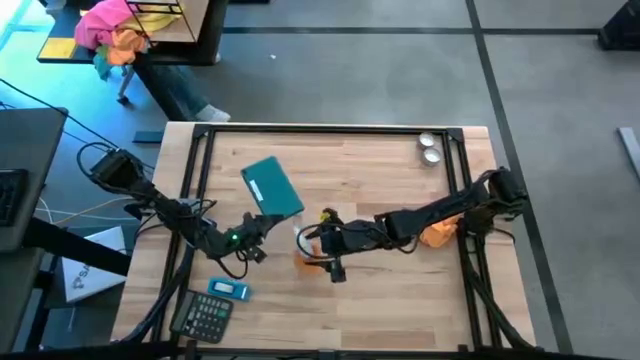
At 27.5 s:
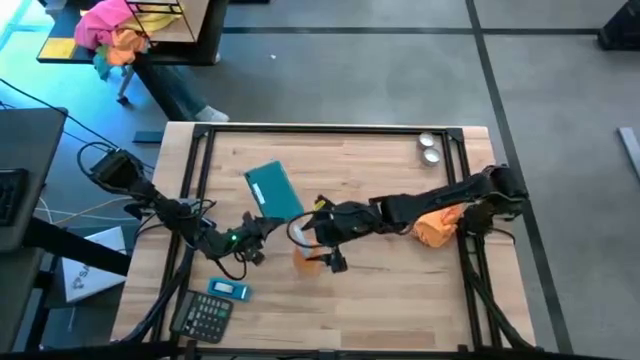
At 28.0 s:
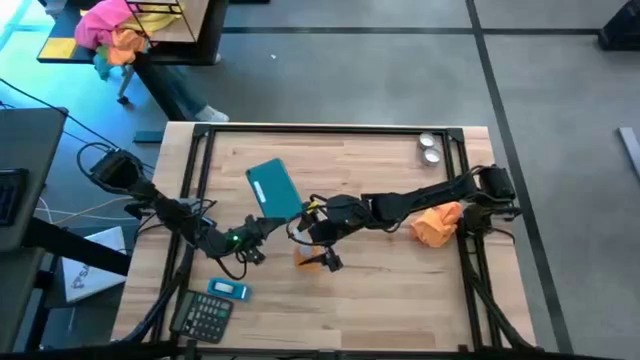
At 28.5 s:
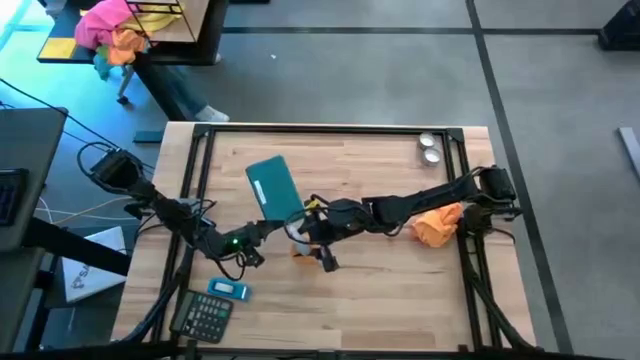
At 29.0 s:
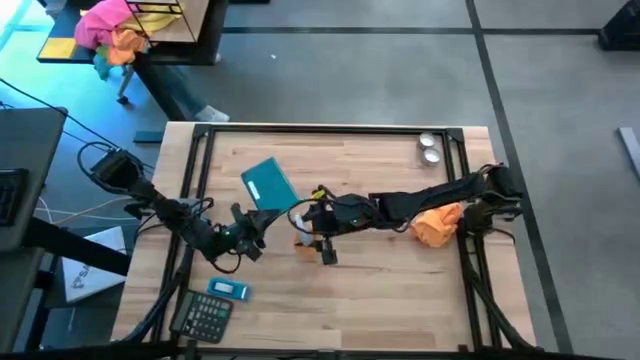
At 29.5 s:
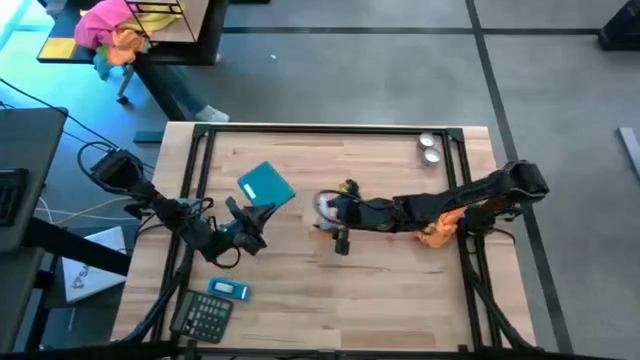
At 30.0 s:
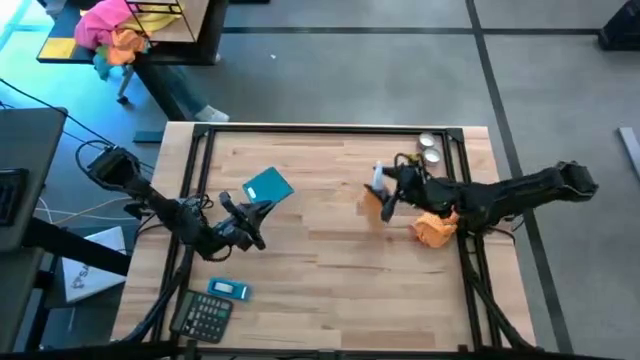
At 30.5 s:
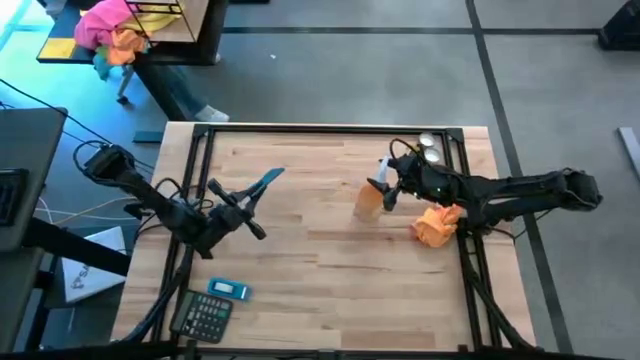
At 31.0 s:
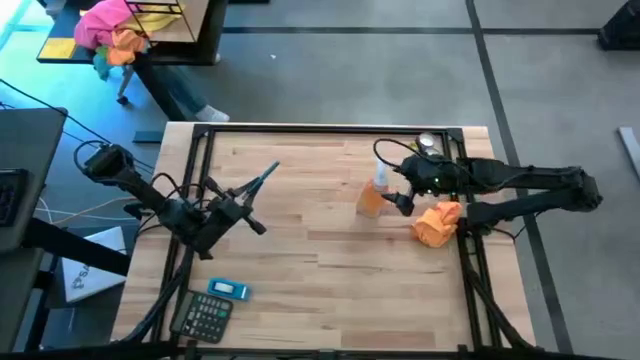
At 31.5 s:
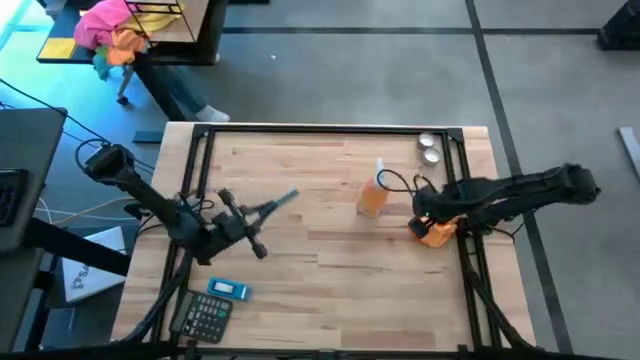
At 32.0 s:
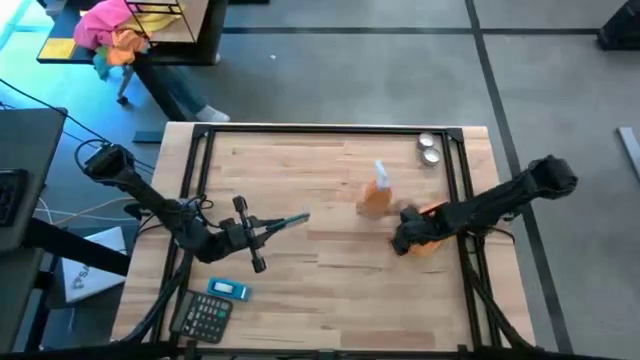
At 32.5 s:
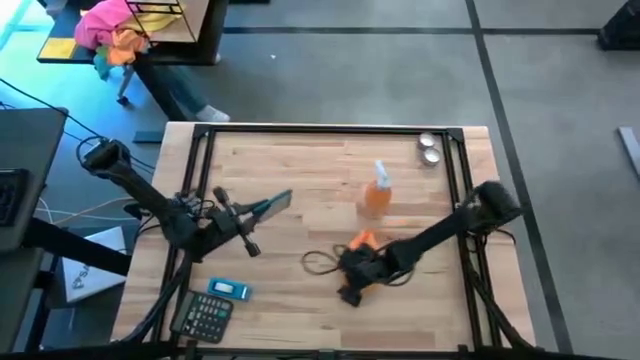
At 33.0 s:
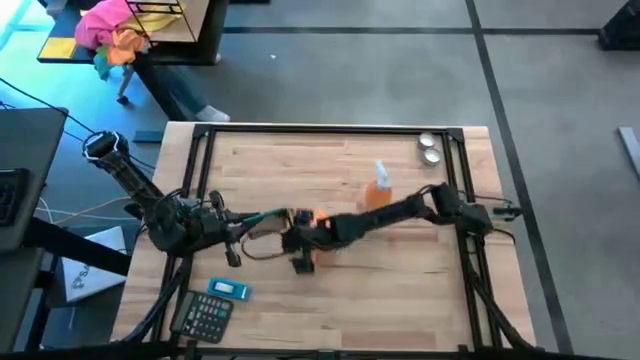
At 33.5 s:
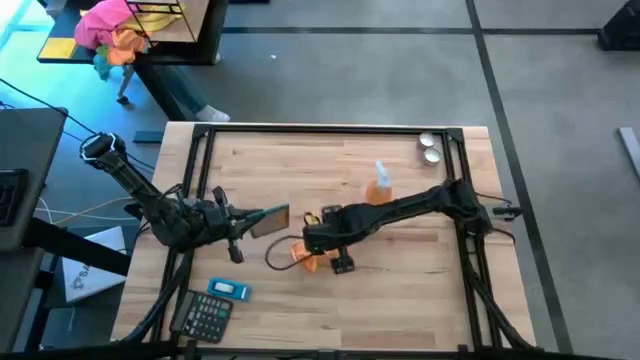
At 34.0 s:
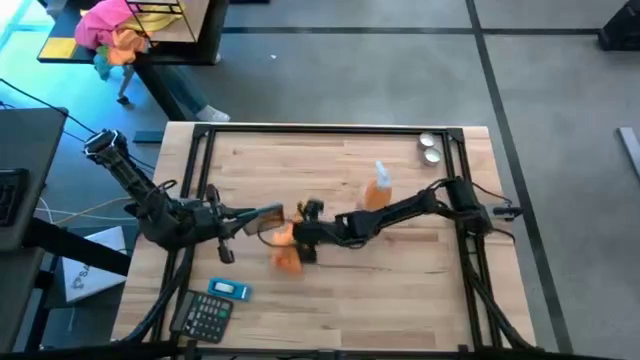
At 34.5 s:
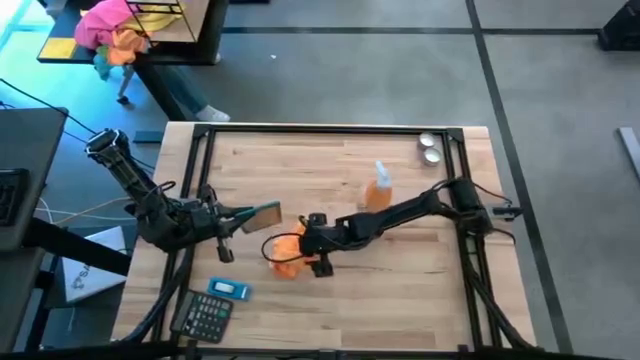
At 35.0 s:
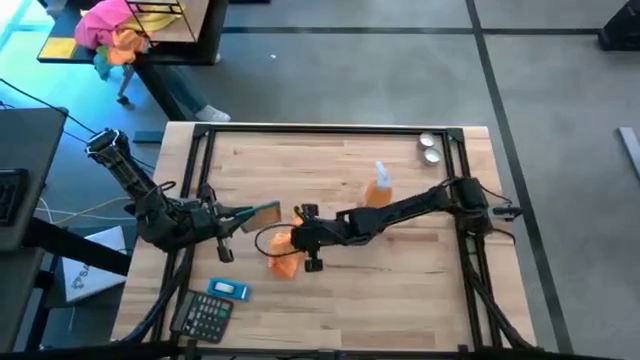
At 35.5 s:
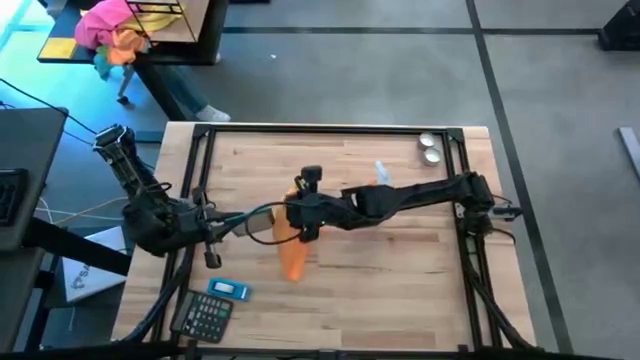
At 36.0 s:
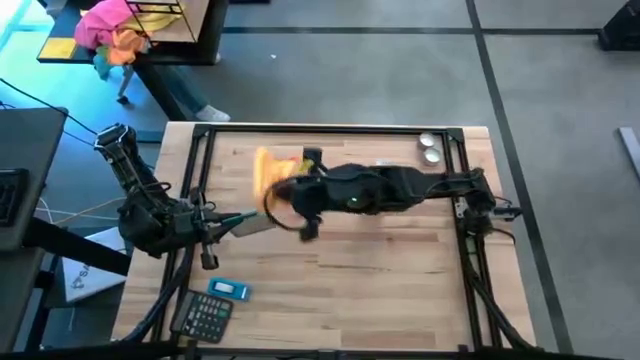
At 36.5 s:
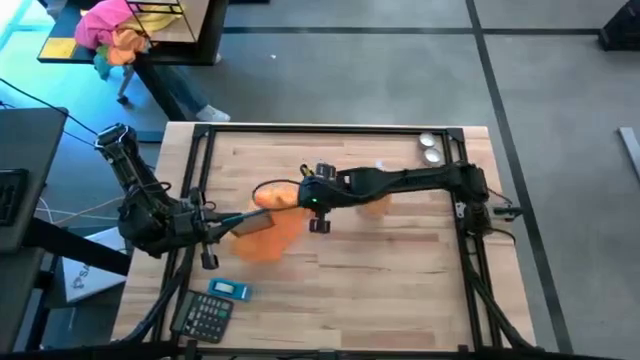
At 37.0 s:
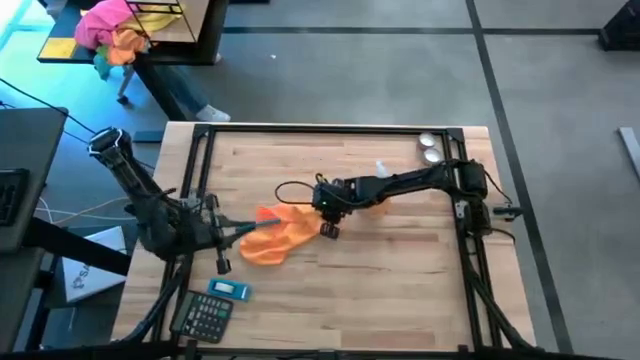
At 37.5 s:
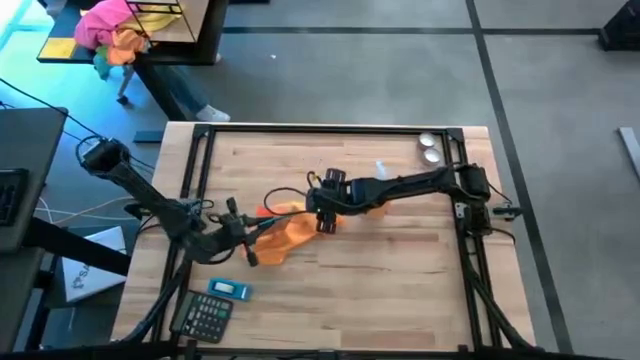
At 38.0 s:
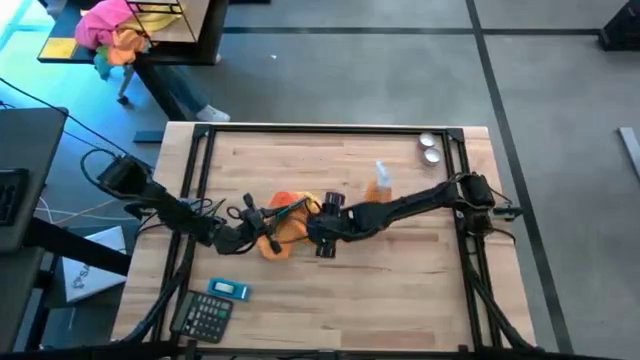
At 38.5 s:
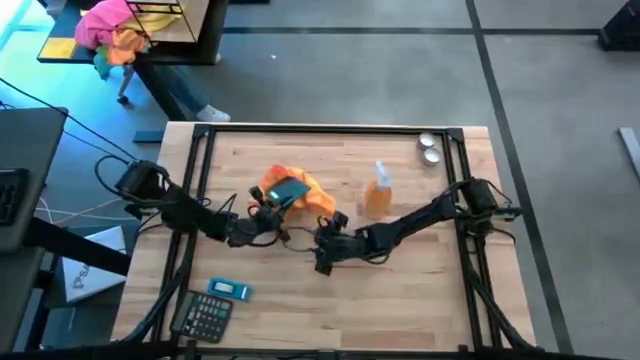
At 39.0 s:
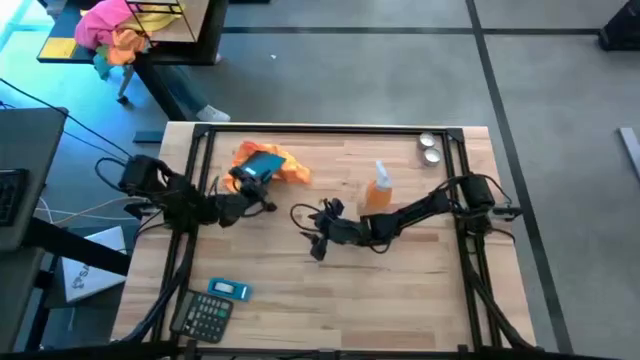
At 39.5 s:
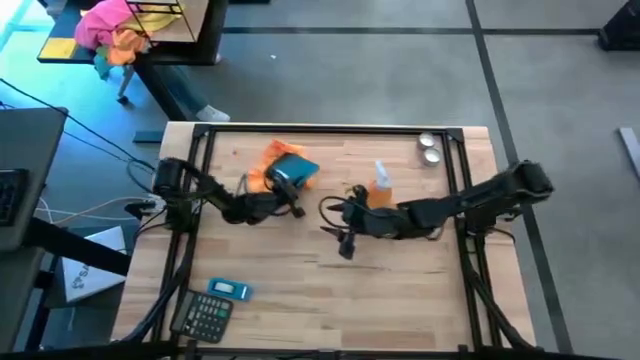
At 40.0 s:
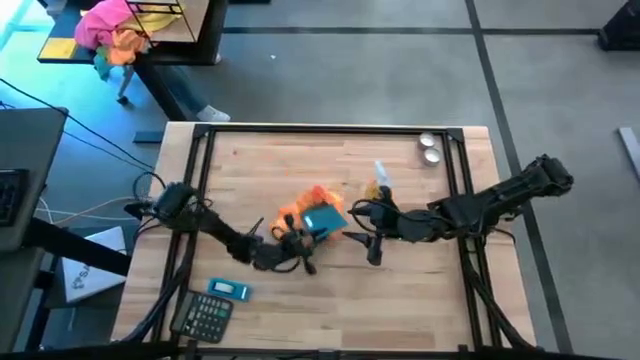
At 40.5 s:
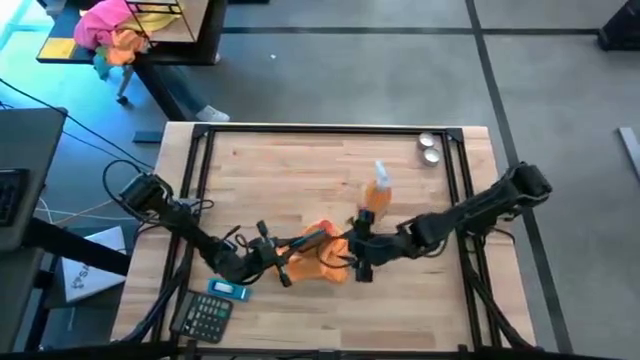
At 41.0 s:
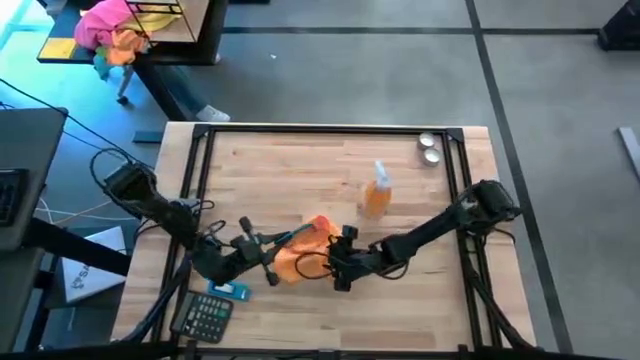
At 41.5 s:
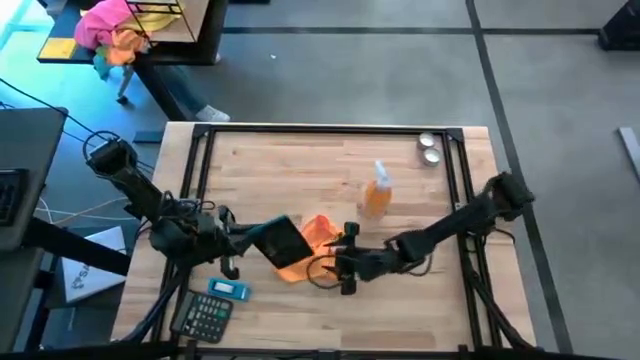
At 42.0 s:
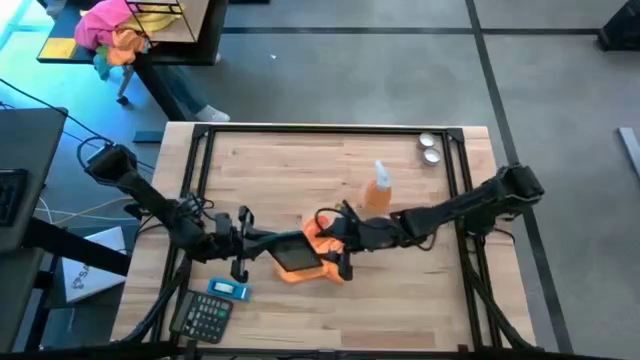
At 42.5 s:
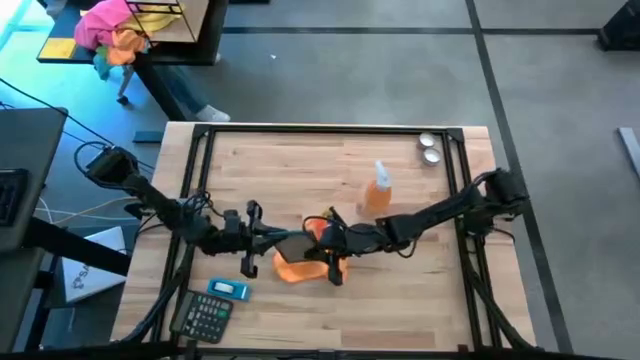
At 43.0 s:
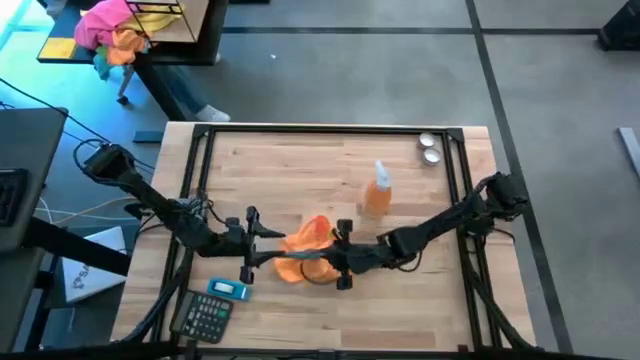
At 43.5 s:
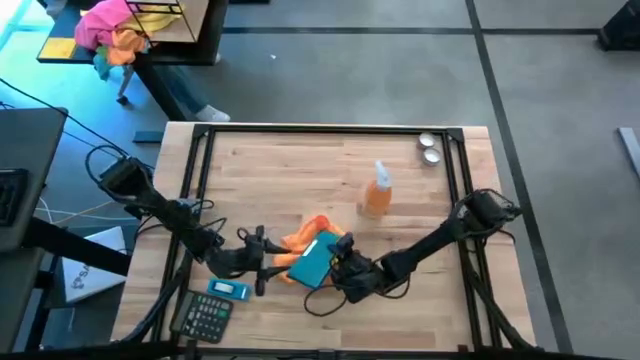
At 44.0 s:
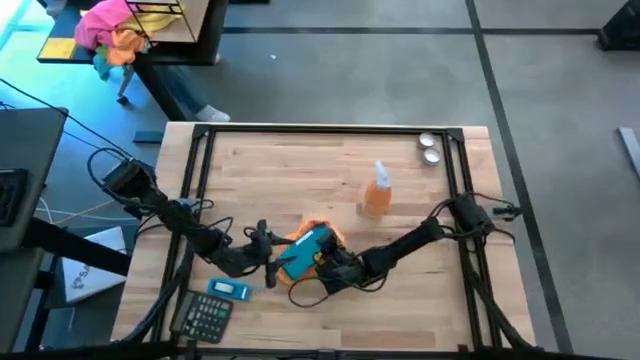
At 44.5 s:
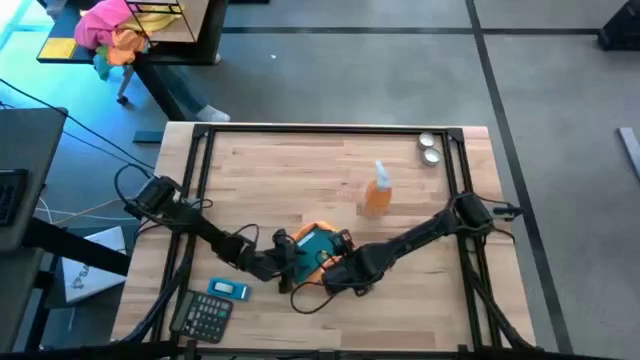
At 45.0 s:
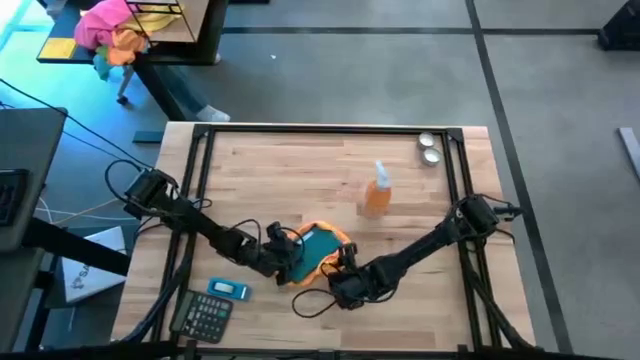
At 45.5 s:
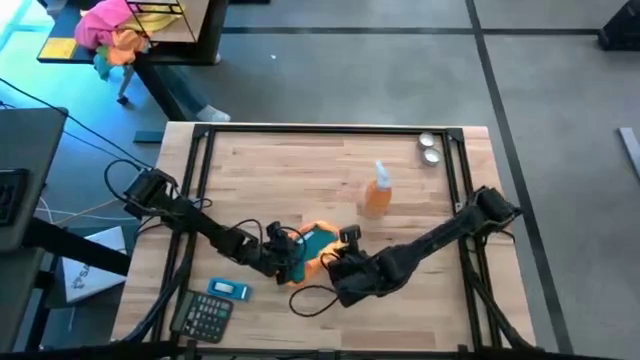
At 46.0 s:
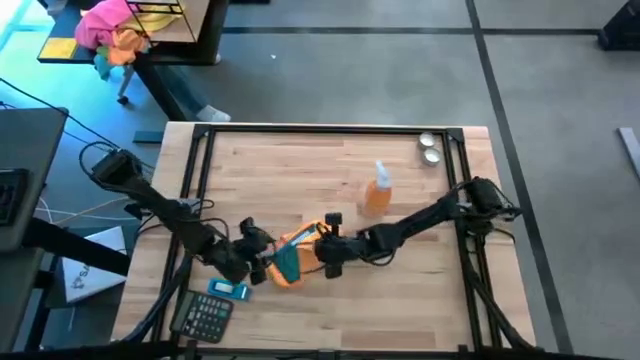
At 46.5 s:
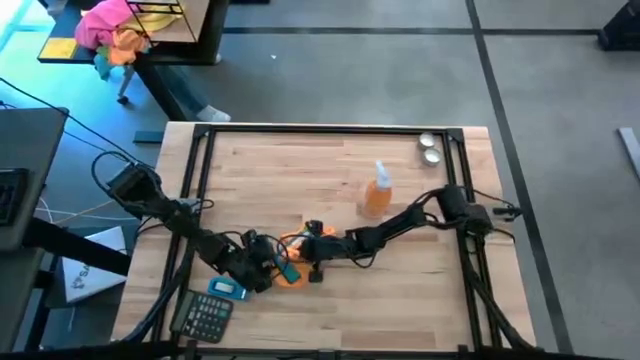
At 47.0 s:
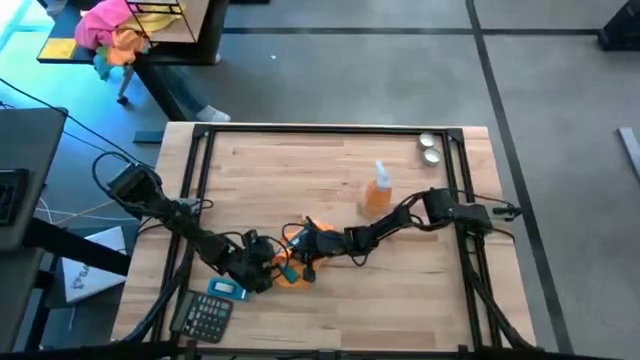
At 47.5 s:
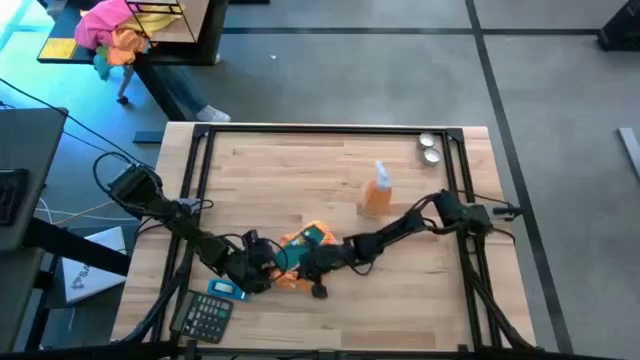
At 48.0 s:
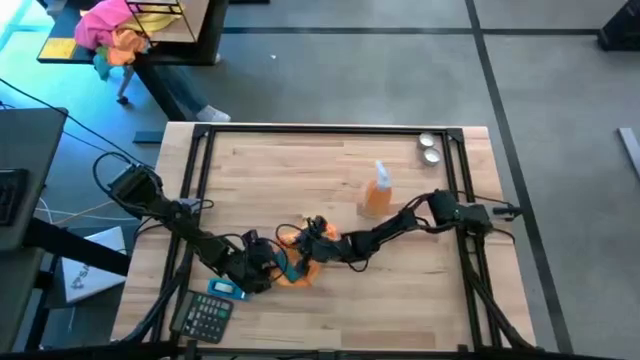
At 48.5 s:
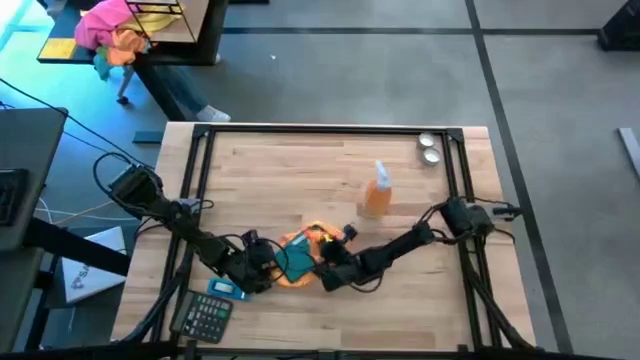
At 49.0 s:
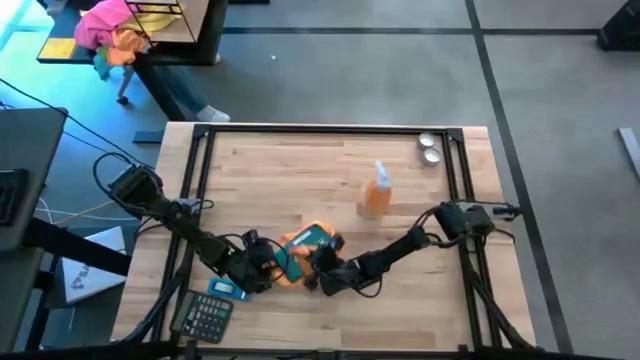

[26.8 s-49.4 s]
Task: Apply microfiber cloth
Wipe tablet with a microfiber cloth
